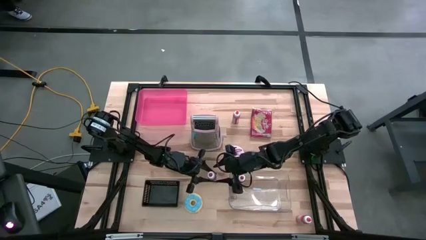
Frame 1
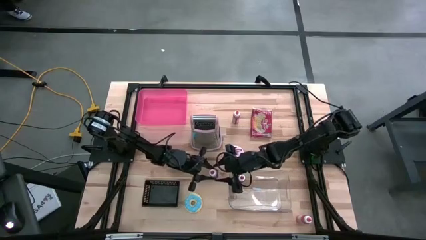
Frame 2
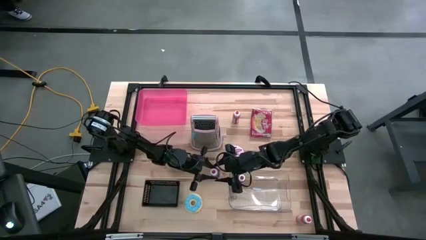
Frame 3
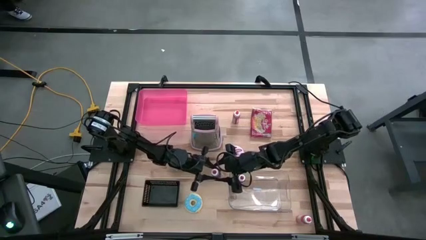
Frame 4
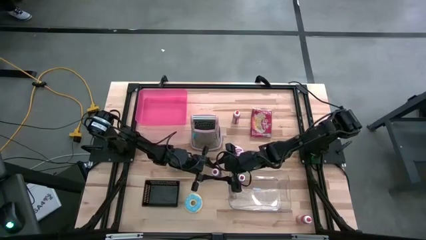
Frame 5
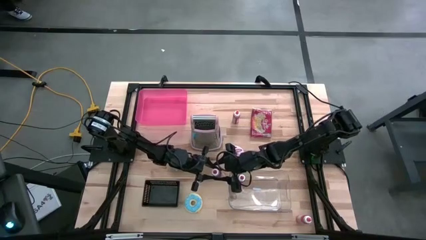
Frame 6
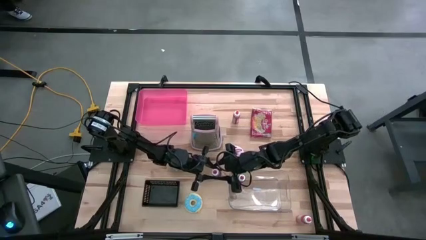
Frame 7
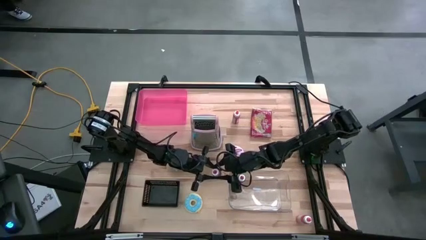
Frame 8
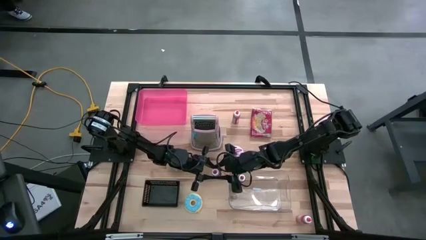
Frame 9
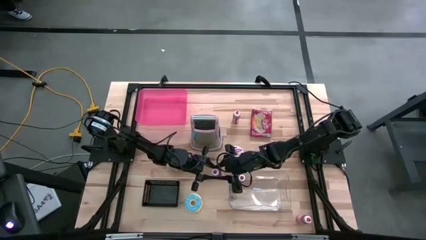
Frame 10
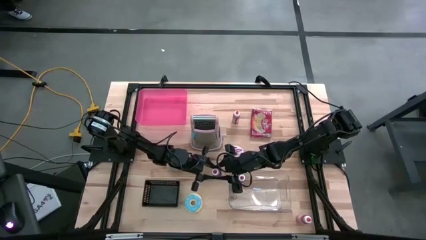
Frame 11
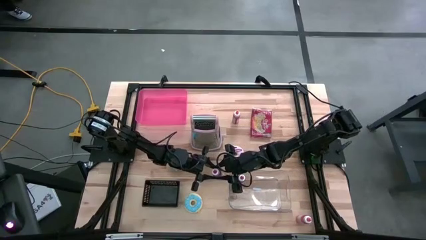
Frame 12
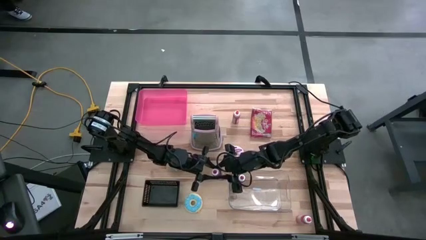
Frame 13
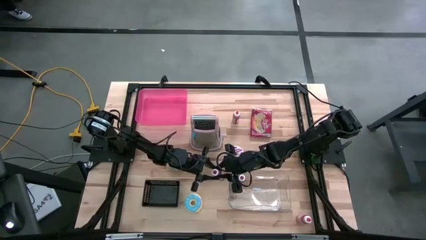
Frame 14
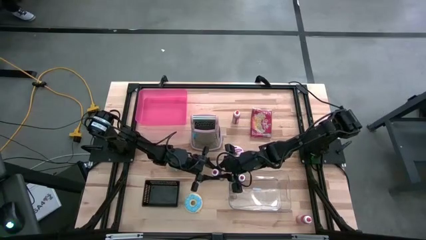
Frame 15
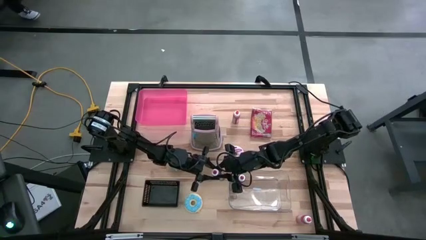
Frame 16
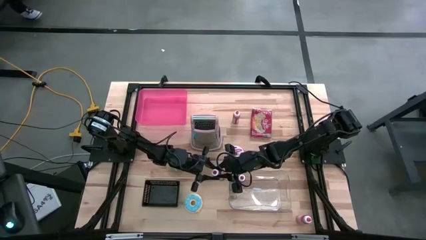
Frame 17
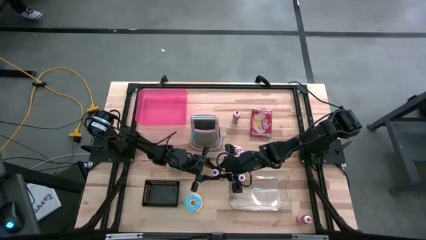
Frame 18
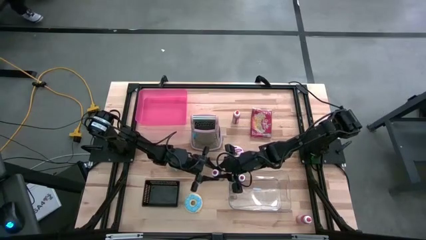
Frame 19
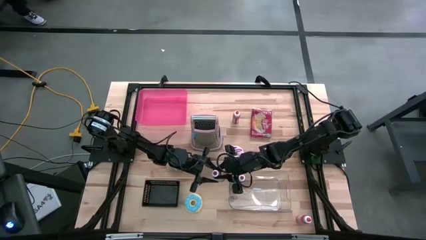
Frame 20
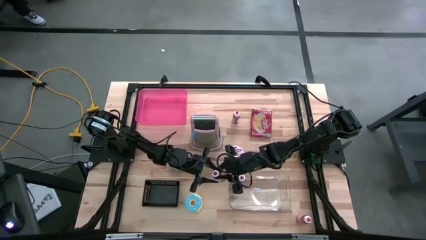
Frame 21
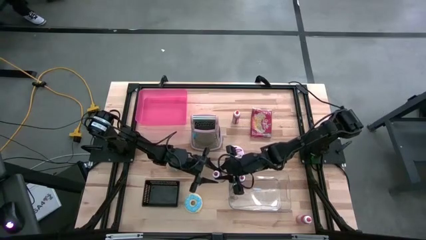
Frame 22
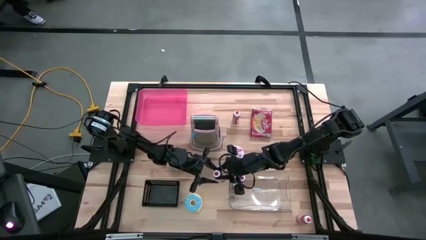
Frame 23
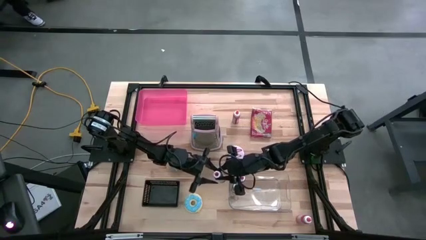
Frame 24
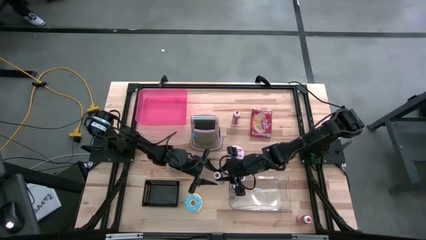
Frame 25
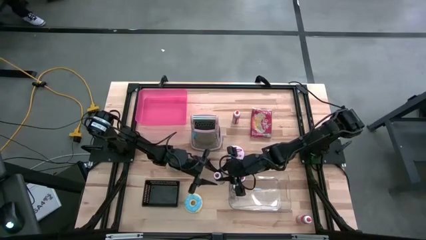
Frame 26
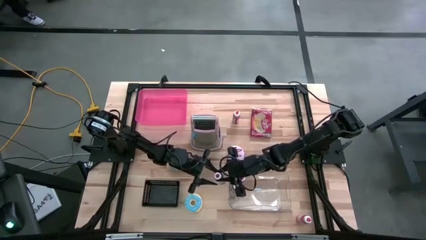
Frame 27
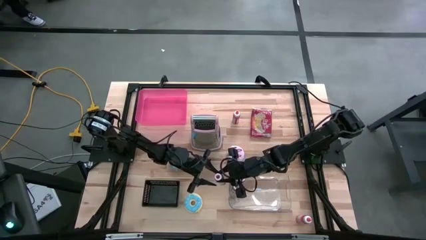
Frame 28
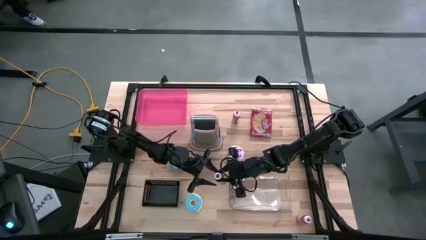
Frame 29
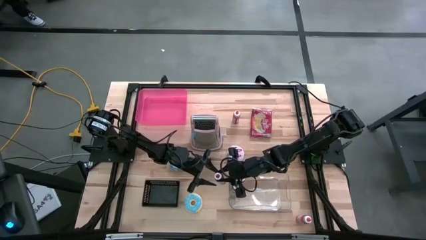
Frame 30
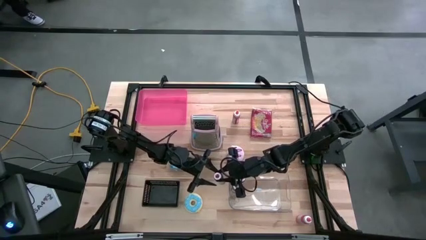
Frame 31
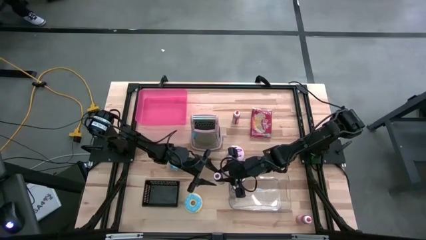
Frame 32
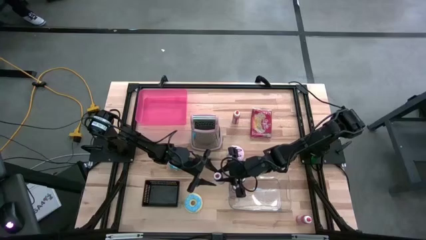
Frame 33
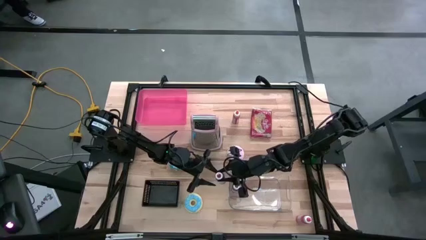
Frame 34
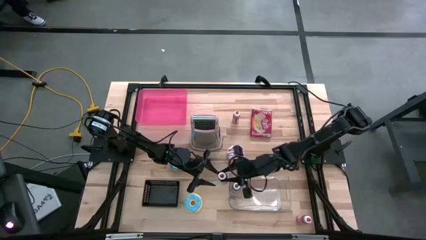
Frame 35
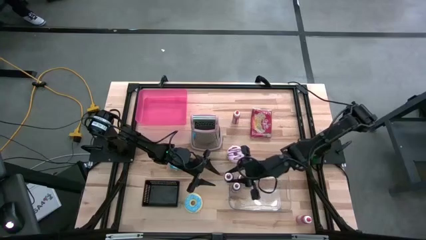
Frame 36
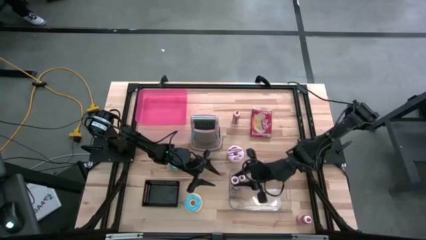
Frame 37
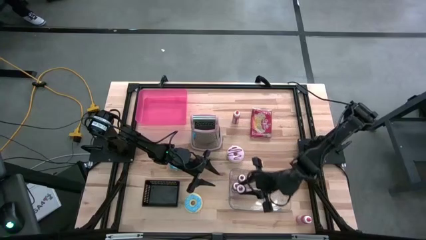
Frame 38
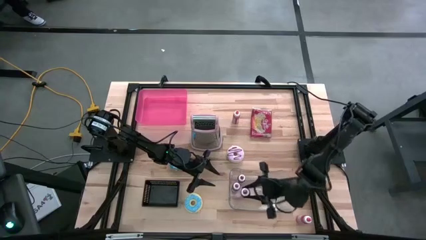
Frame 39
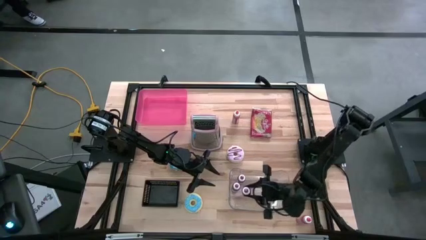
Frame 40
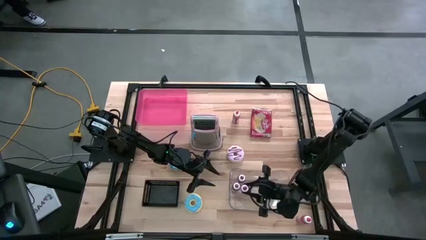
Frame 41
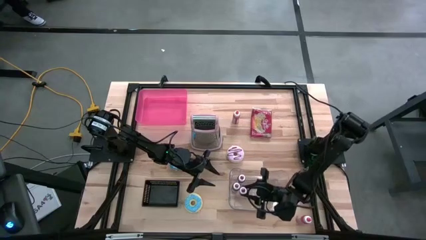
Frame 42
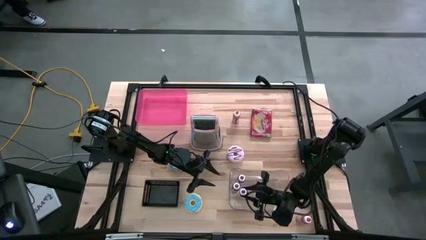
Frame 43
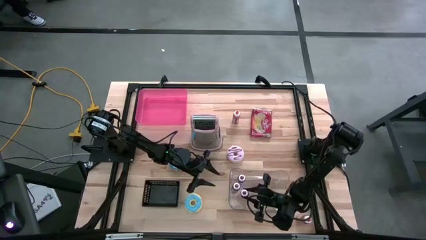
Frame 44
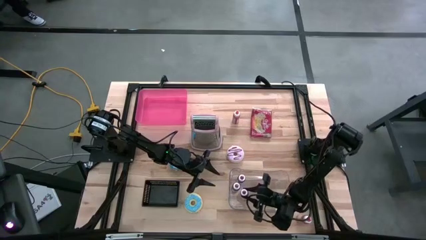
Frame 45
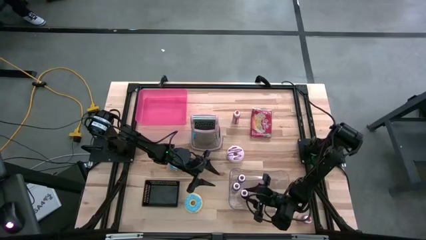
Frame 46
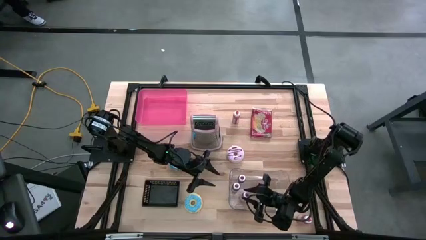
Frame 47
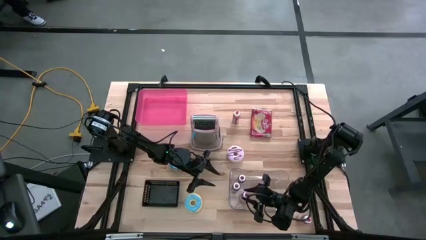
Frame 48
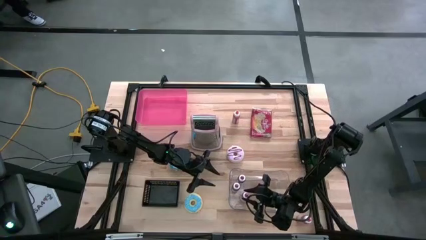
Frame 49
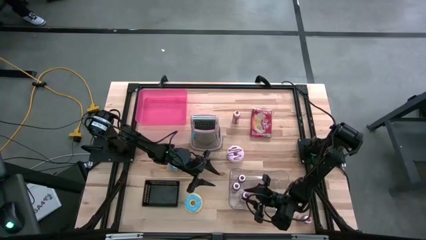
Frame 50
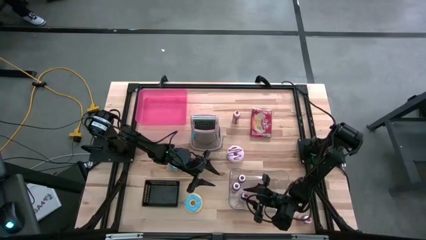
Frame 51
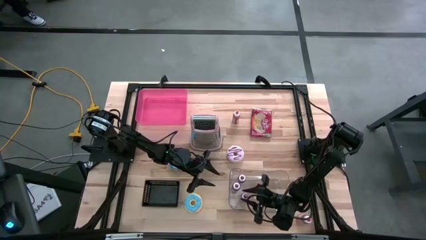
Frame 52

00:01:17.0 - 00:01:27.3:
Task: Pick & Place Food Item
Put the red food coloring bottle into the transparent bin

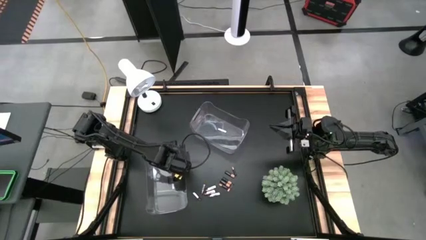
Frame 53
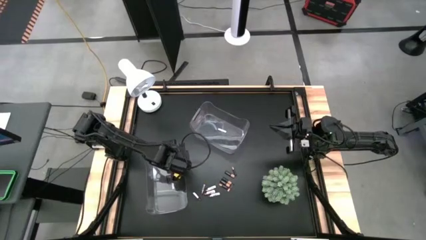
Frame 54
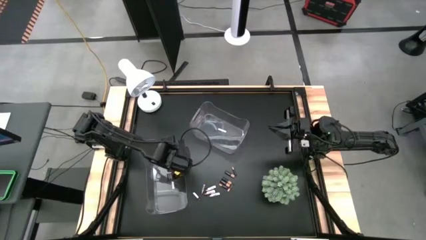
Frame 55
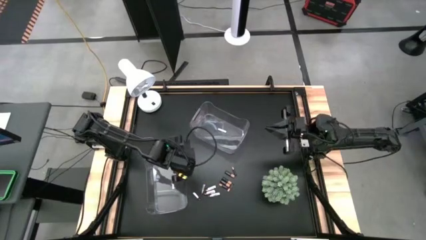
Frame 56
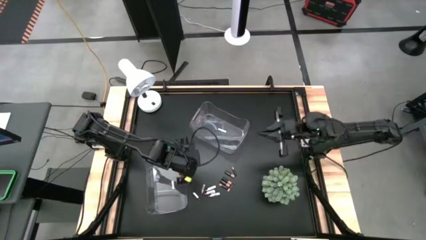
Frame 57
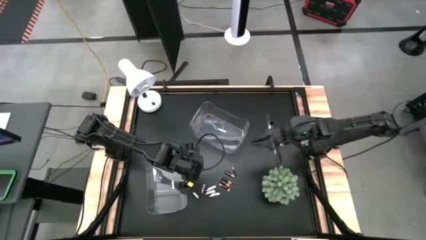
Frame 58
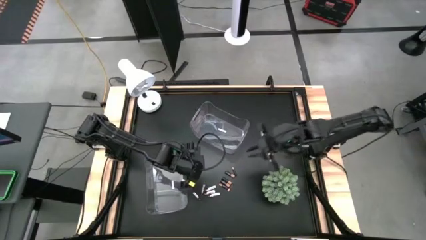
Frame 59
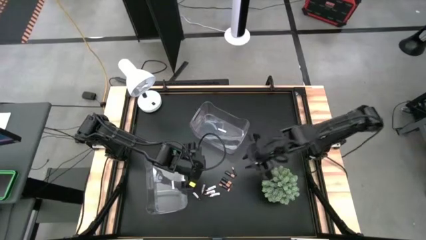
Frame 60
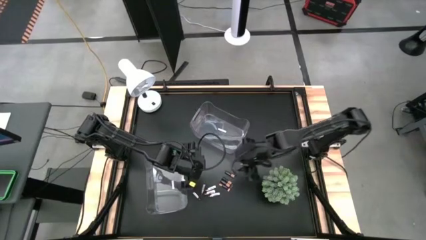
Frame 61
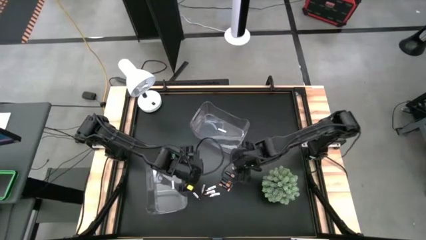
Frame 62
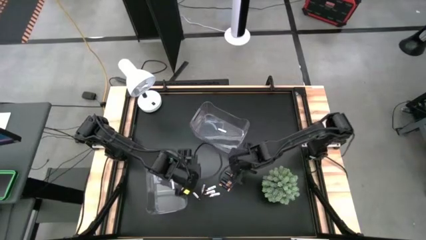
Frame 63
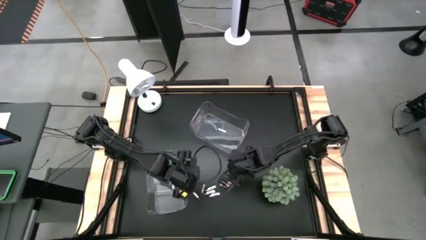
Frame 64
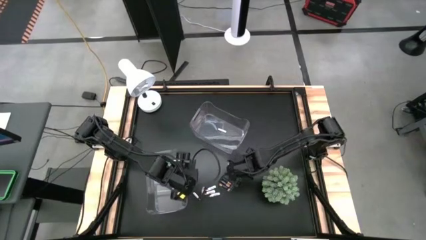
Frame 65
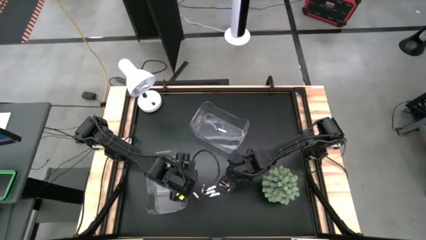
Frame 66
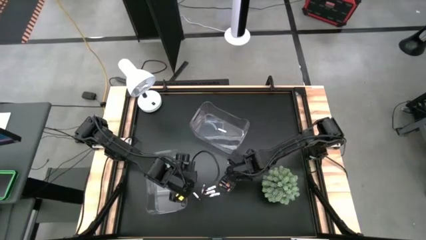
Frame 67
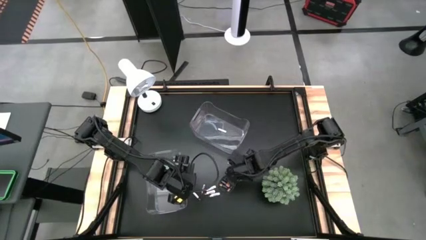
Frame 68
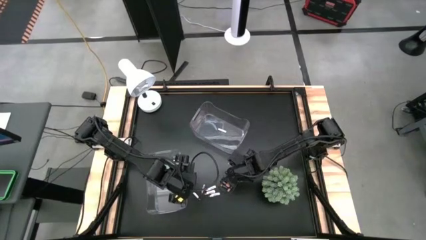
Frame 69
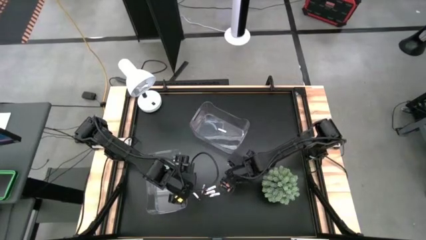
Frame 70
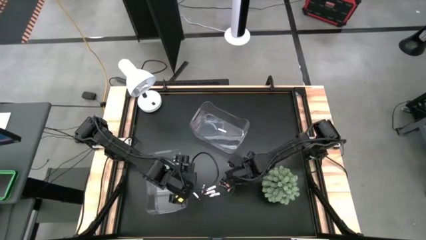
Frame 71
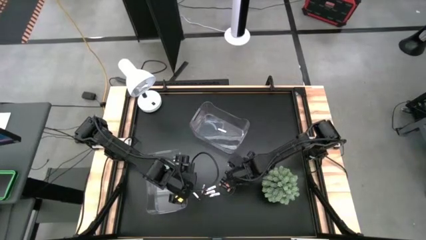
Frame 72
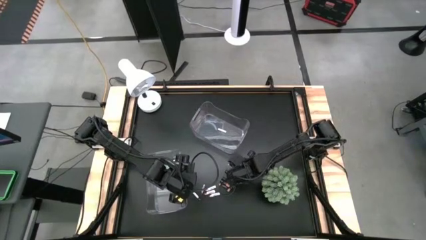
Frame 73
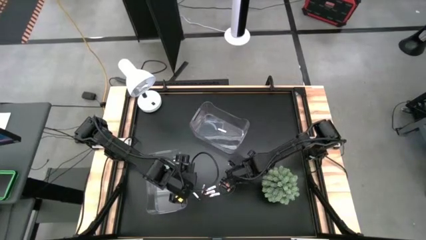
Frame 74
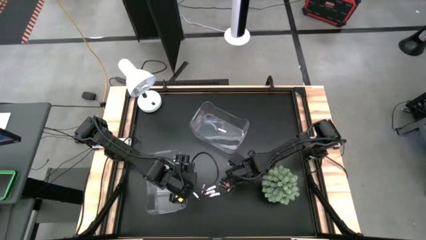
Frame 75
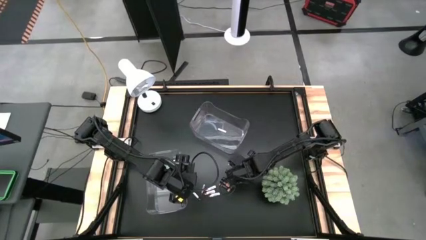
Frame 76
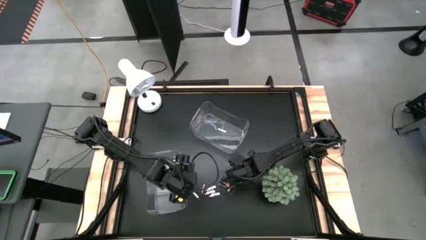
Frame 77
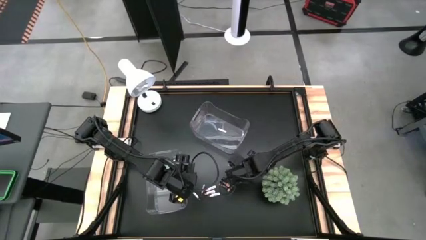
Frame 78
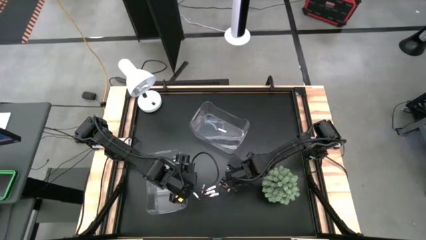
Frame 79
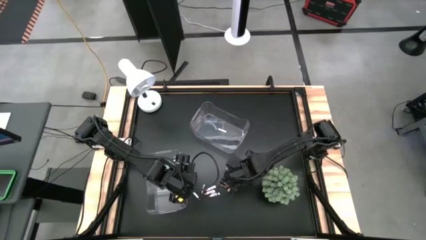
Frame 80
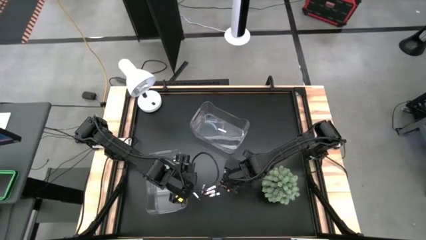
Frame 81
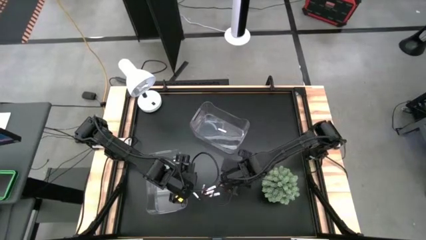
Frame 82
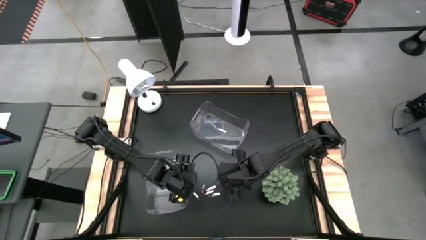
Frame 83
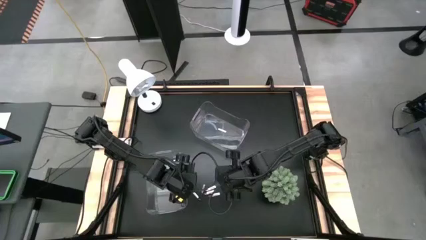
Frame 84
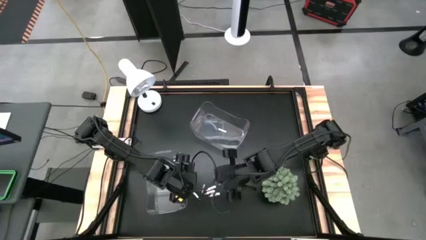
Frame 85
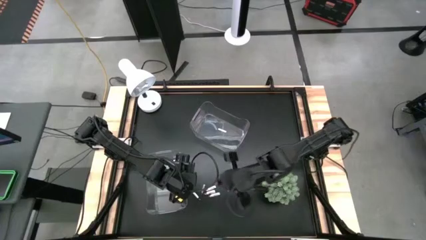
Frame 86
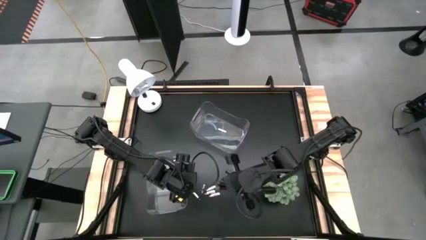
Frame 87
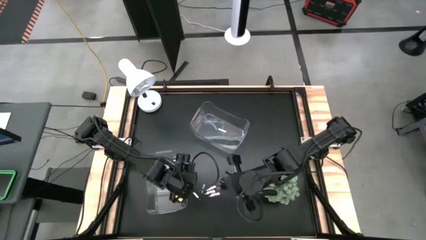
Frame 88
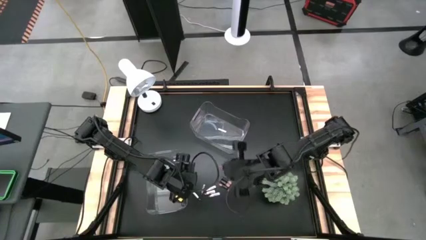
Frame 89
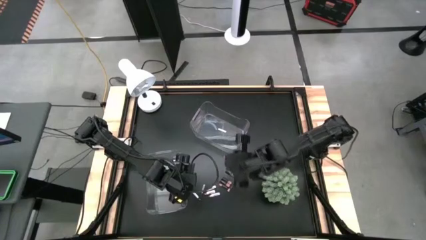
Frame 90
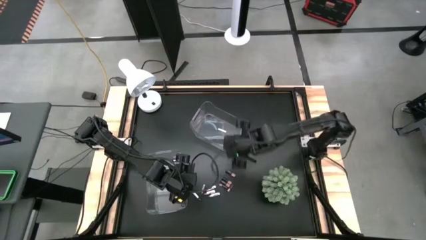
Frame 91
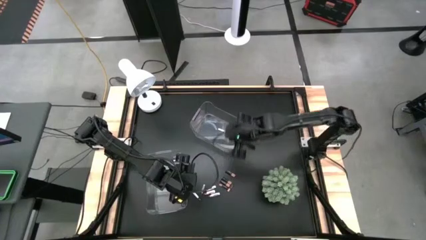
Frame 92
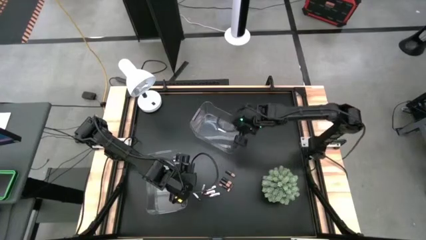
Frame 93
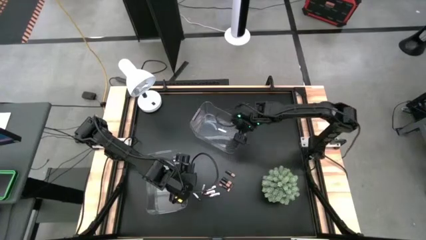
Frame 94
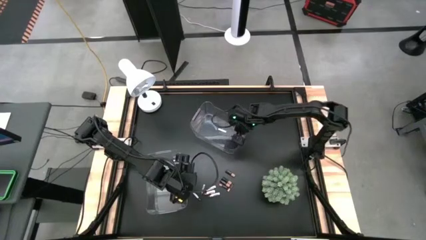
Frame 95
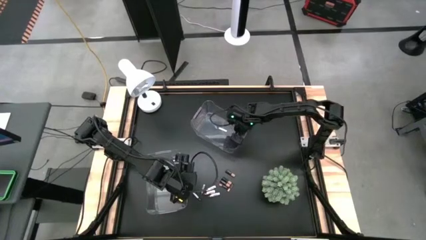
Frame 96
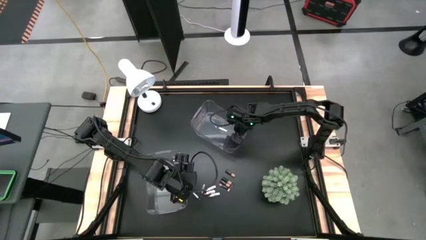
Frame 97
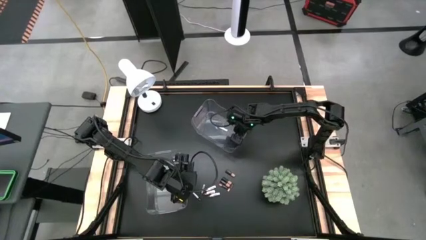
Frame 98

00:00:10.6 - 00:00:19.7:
Task: Sort batteries
Put the black battery into the top transparent bin
